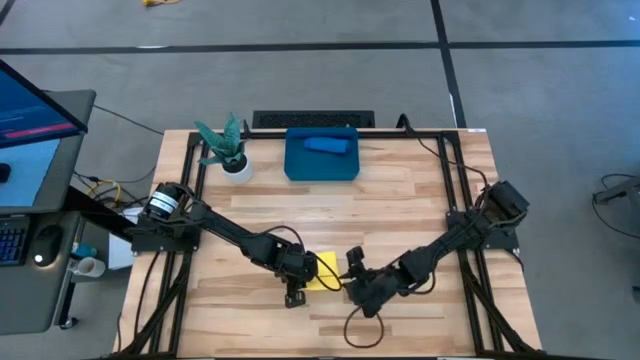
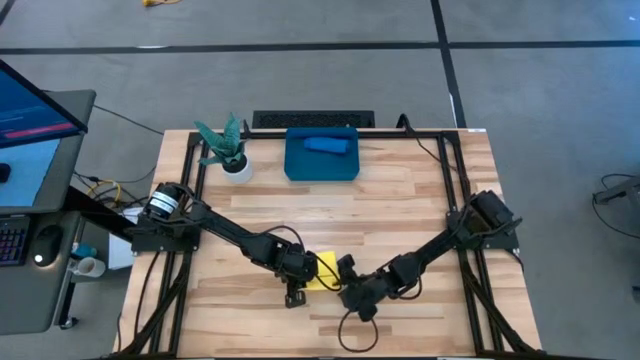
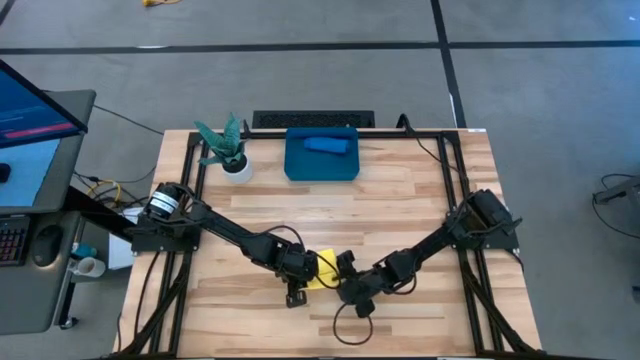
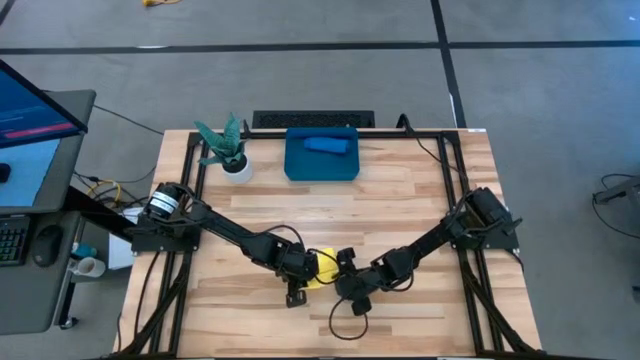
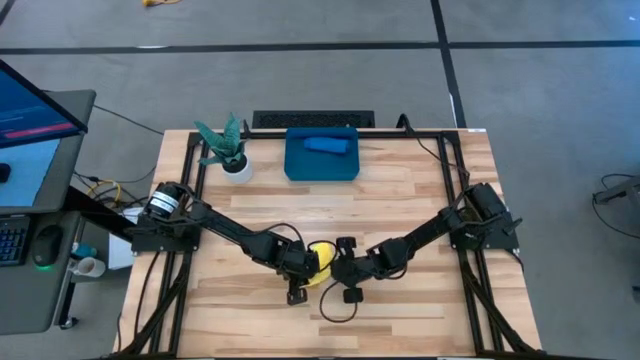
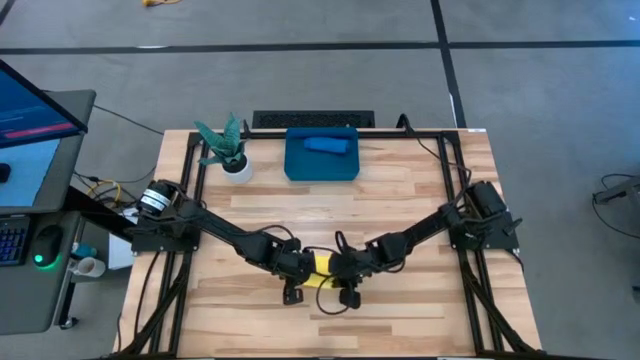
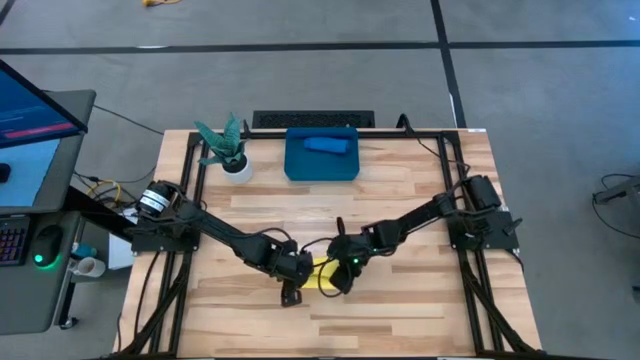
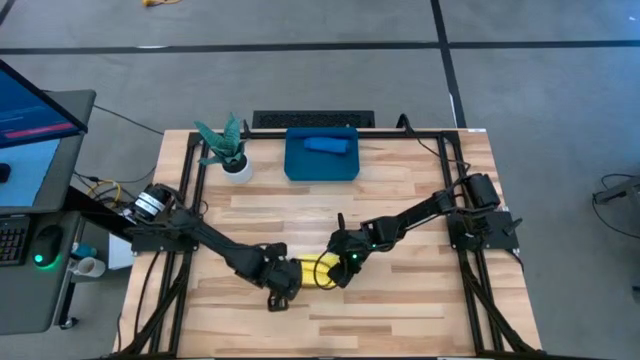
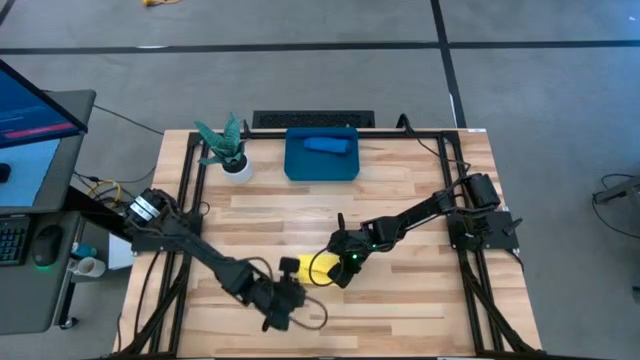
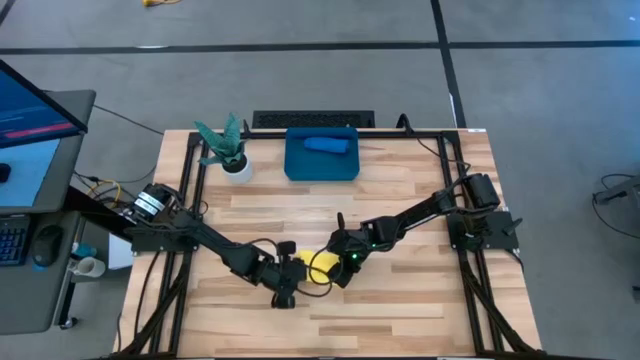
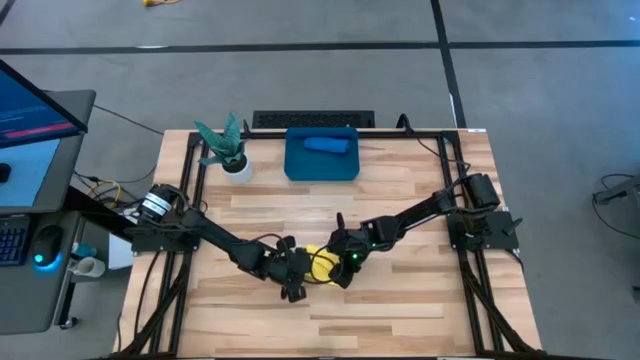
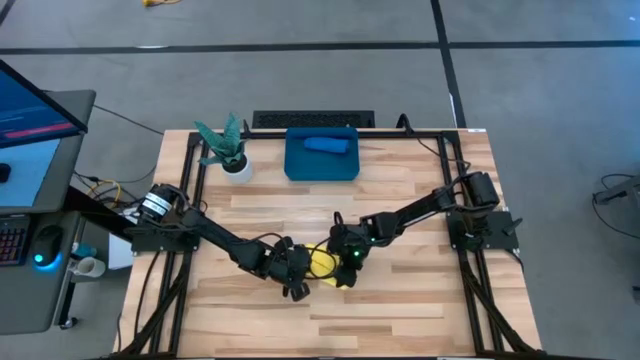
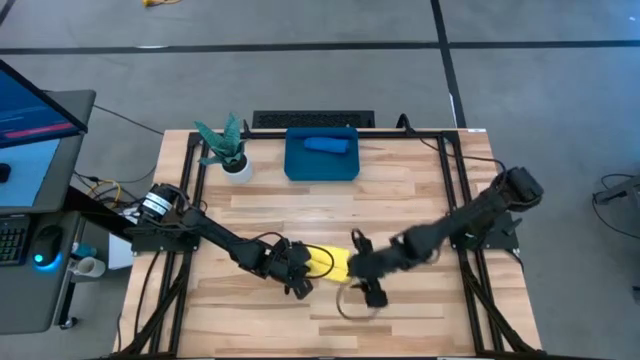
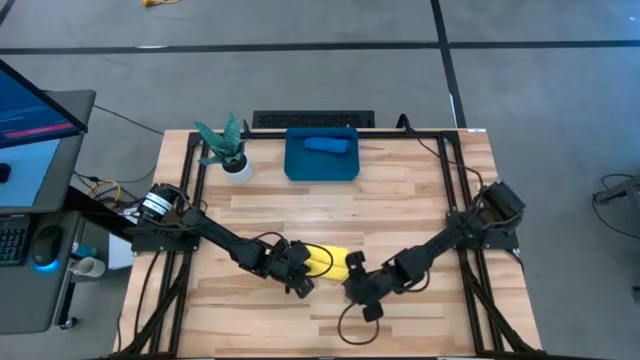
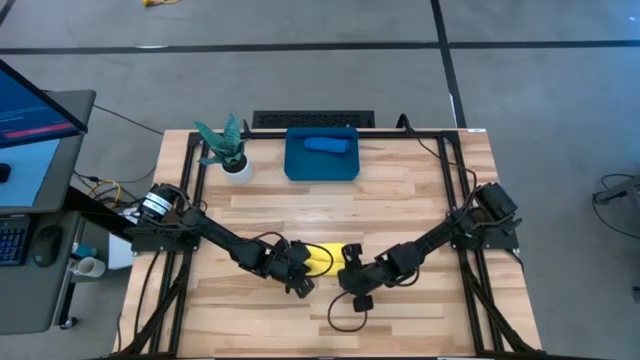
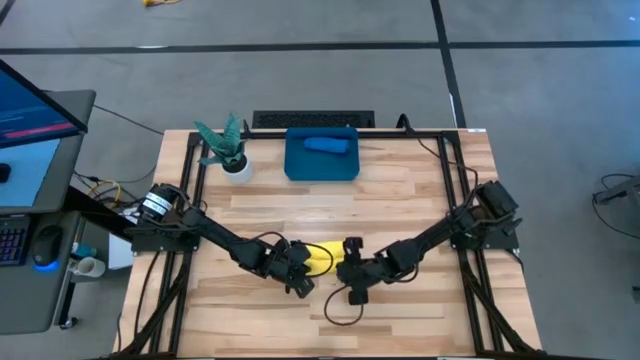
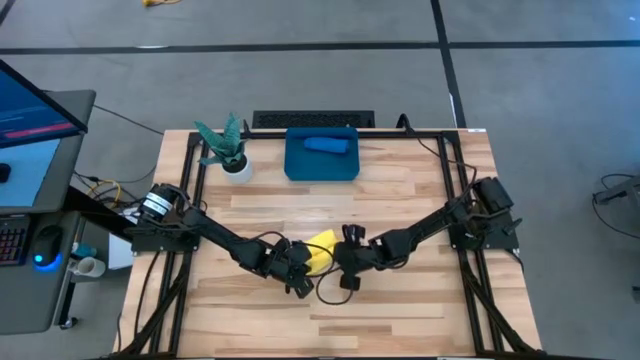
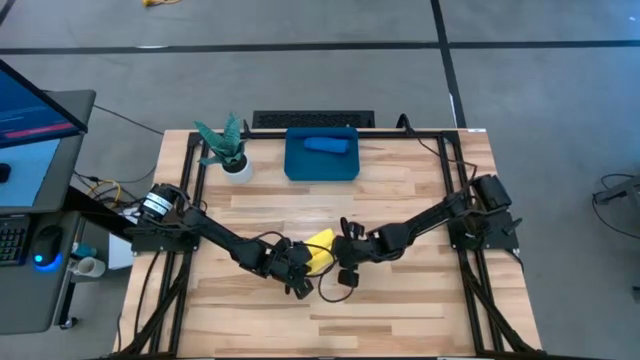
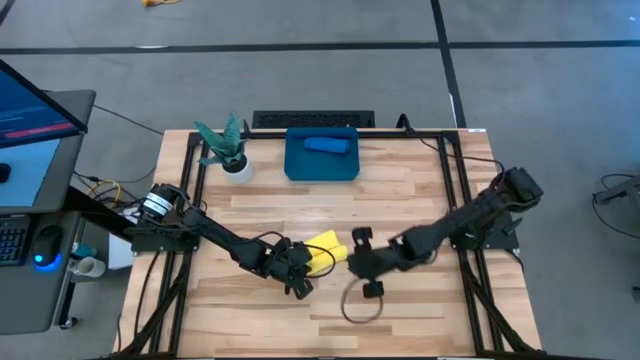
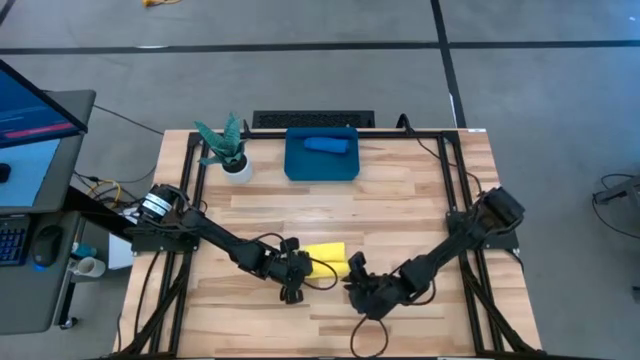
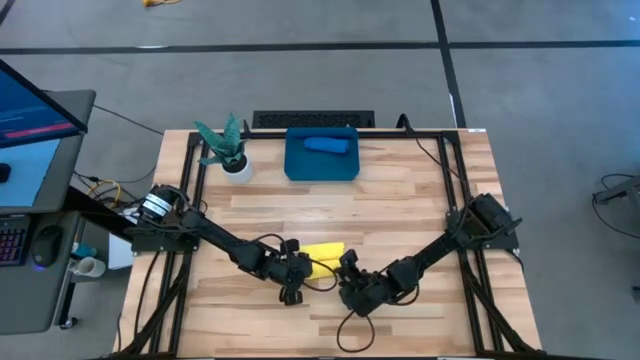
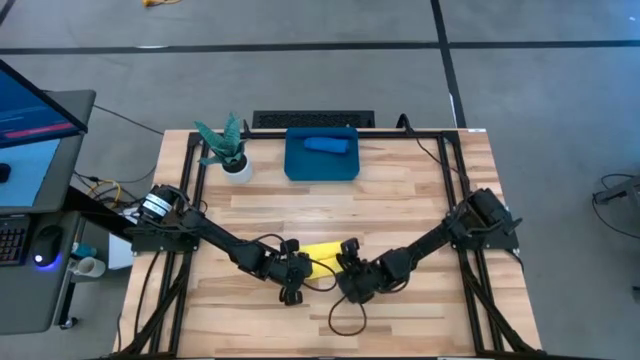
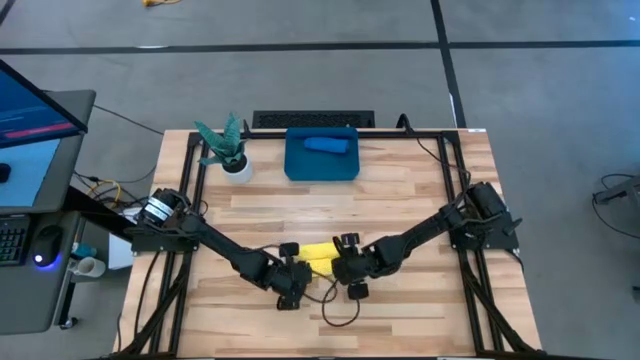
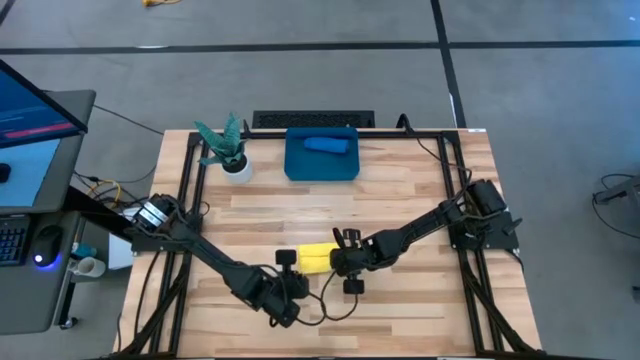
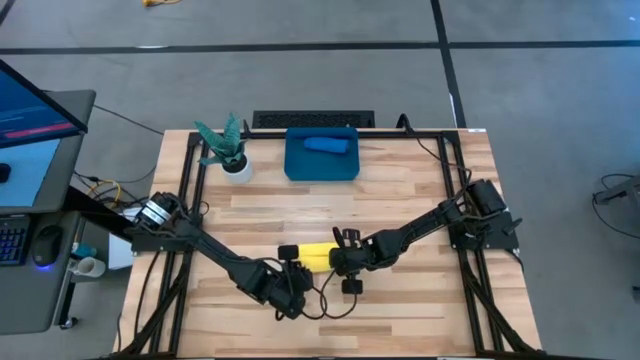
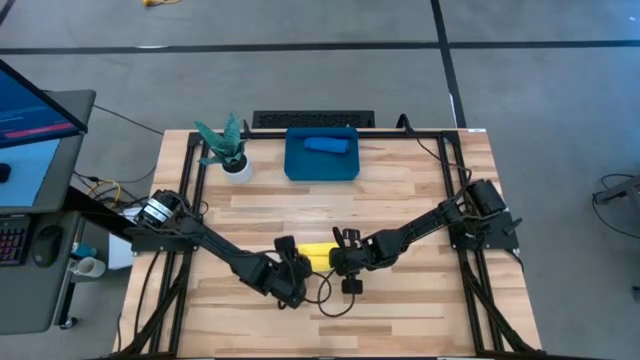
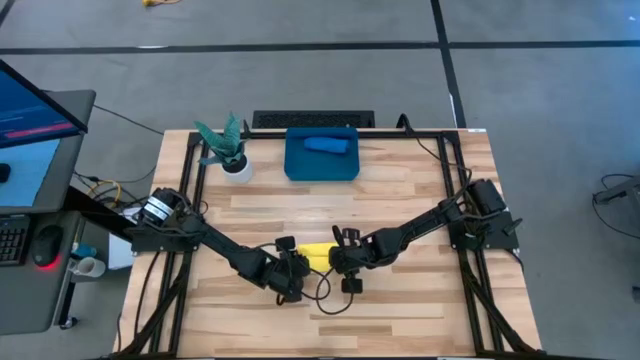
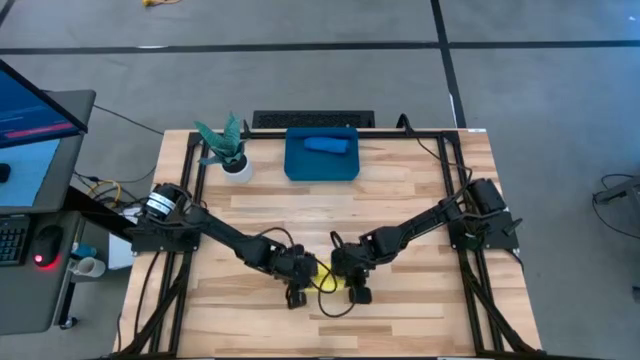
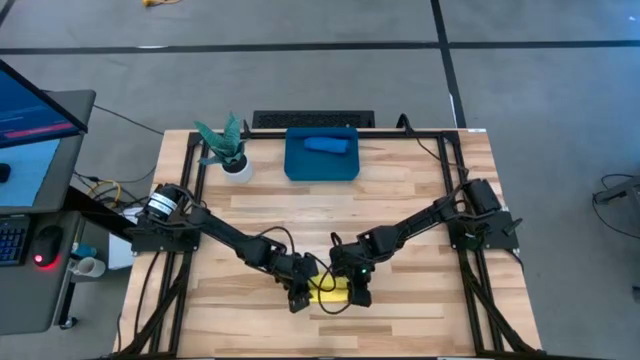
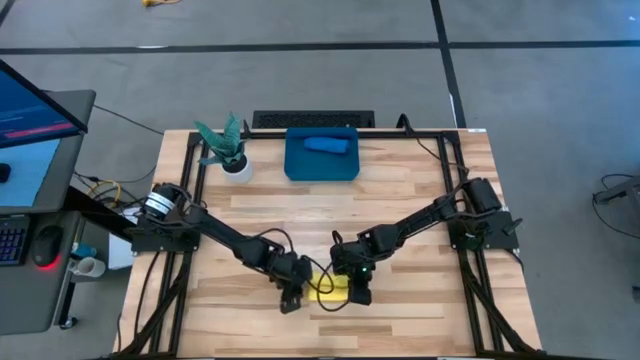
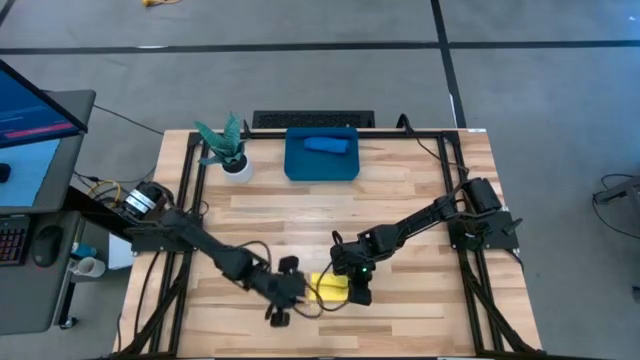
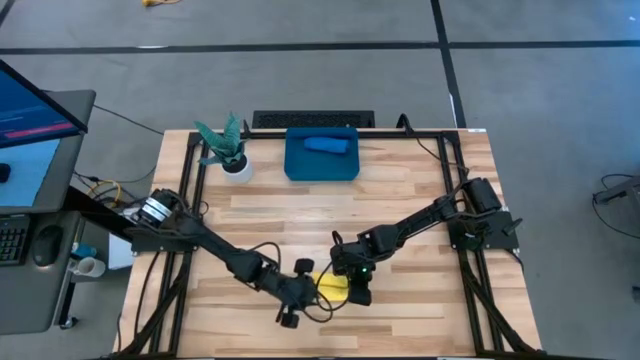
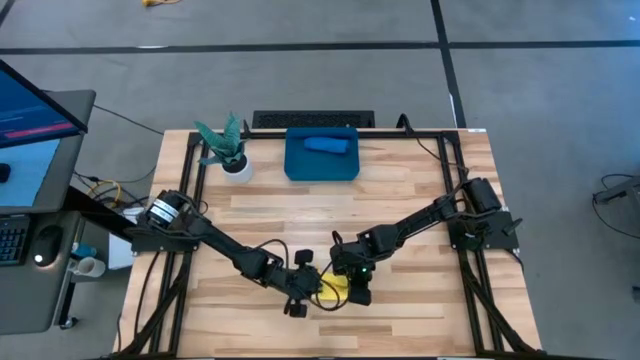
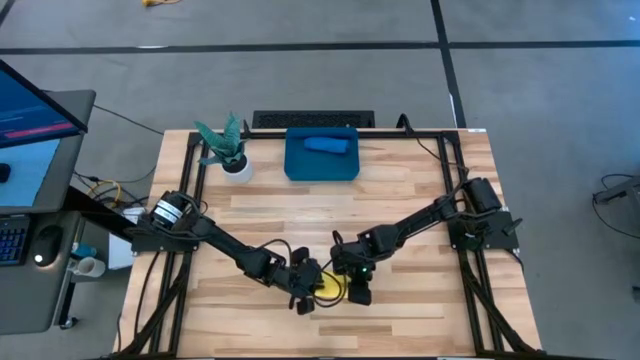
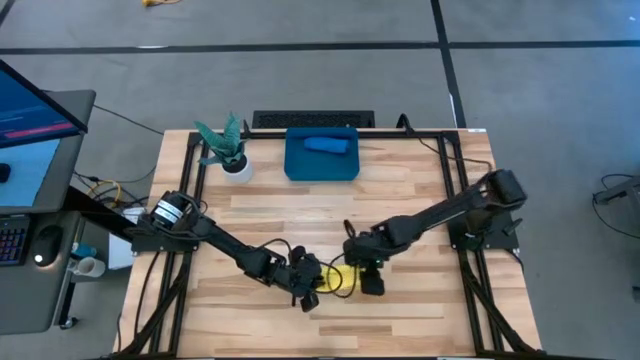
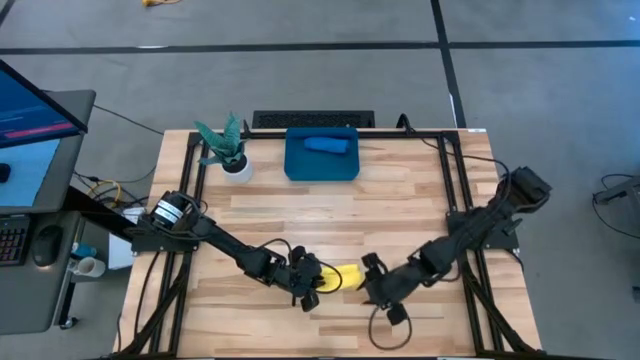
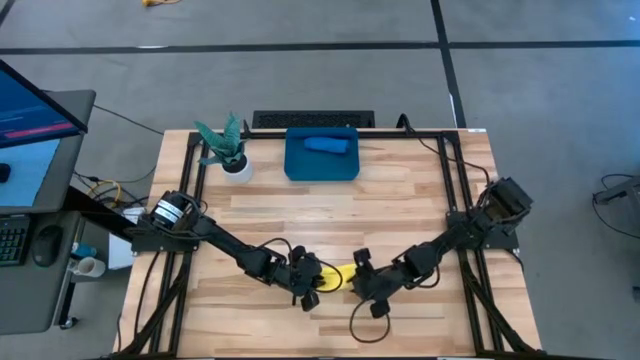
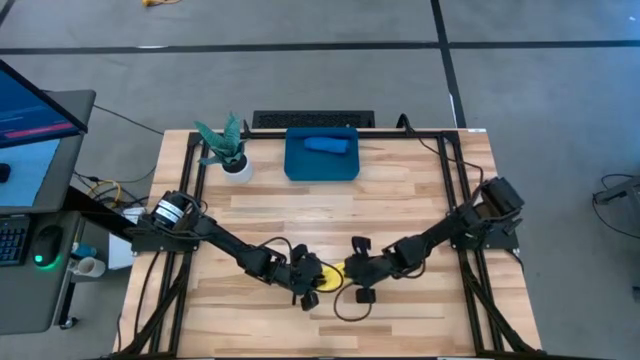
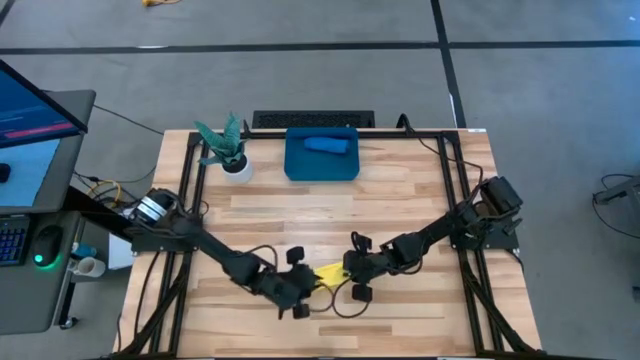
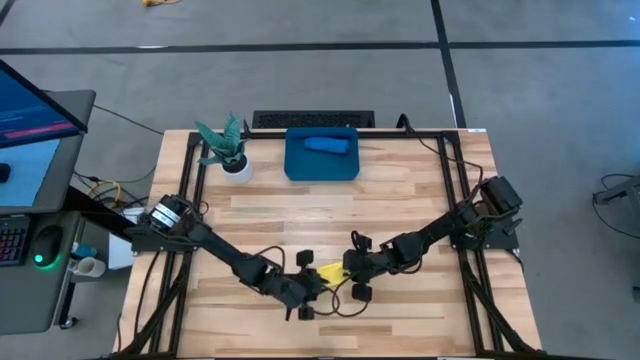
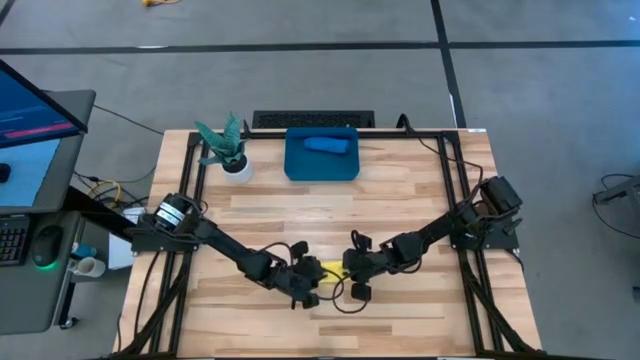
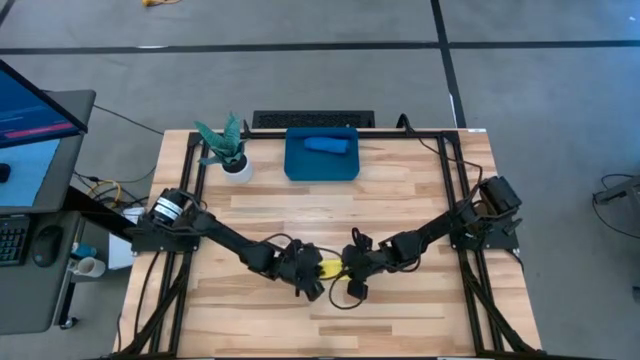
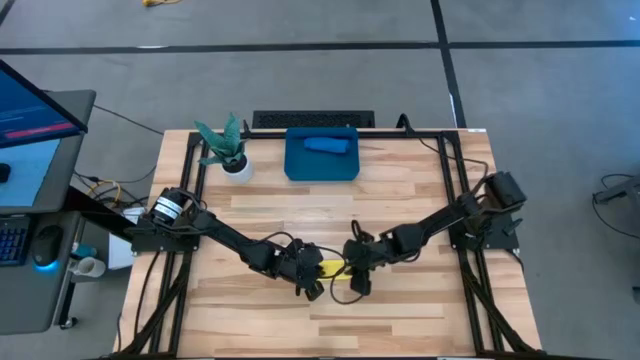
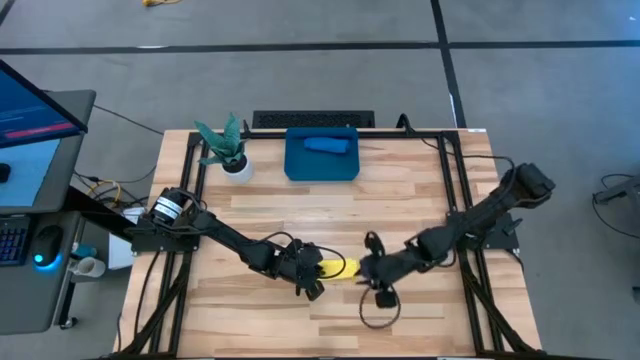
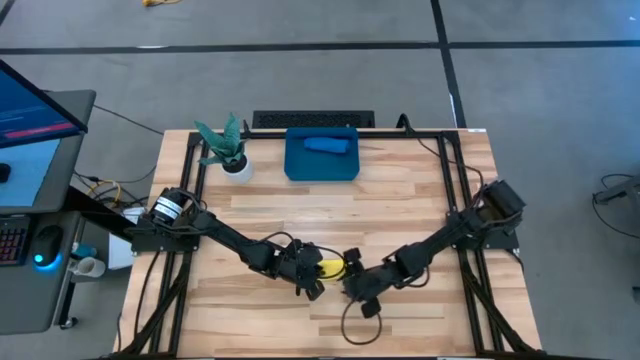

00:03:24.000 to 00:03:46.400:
Task: Roll microfiber towels into tight, uniform cylinder then place into a basket
Roll the yellow microfiber towel
